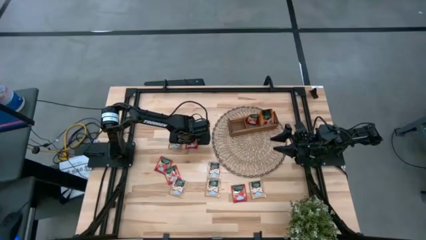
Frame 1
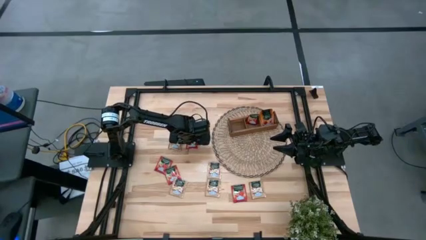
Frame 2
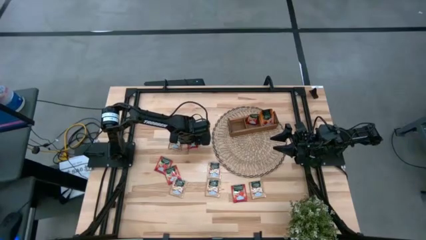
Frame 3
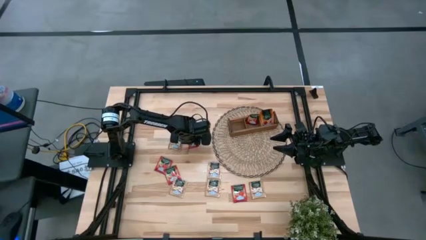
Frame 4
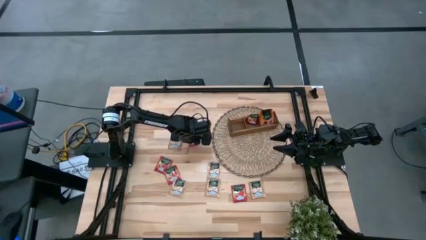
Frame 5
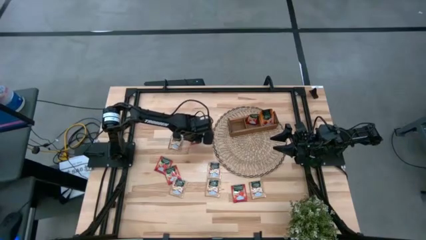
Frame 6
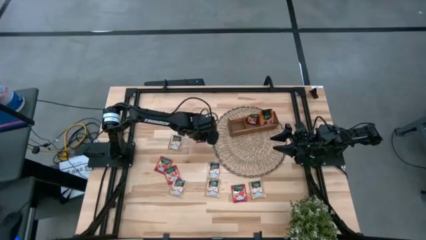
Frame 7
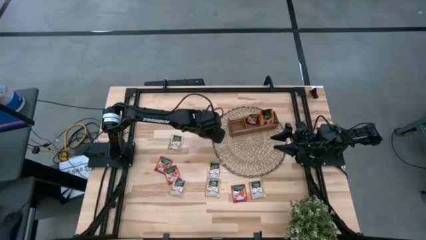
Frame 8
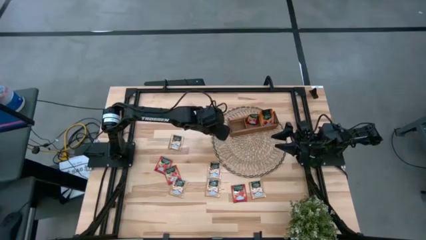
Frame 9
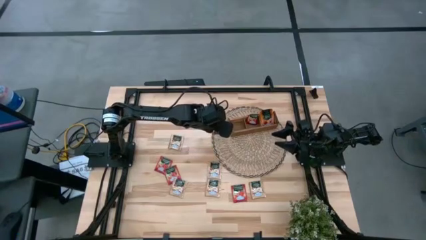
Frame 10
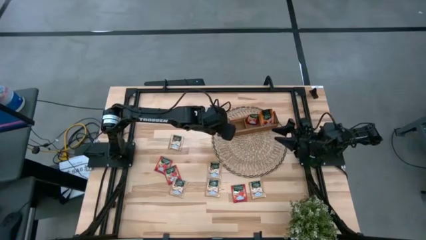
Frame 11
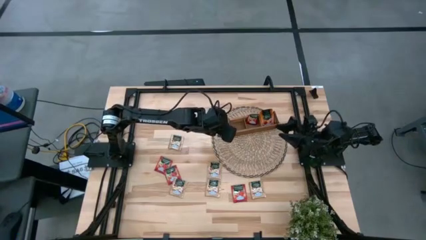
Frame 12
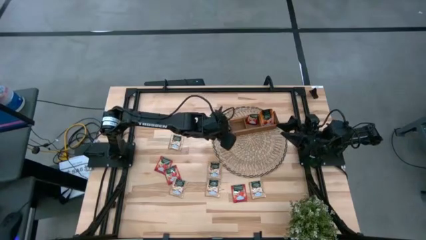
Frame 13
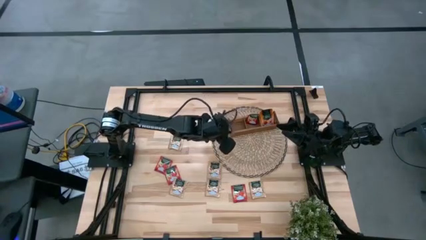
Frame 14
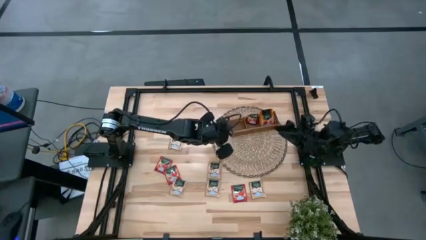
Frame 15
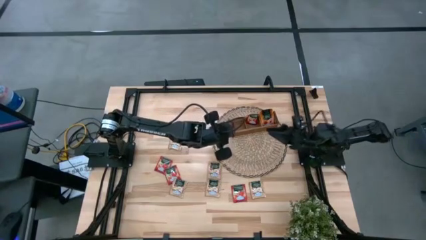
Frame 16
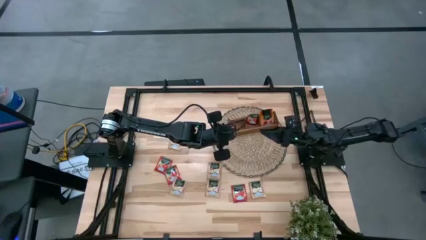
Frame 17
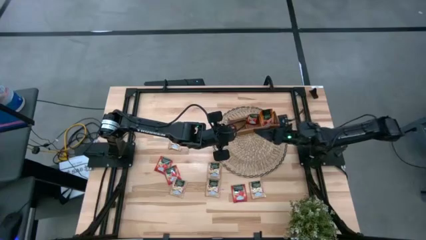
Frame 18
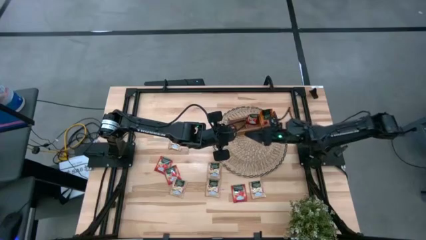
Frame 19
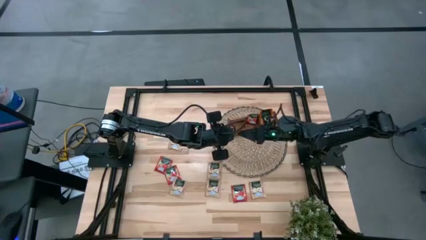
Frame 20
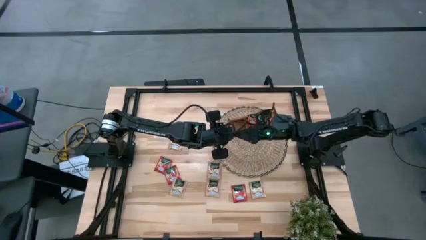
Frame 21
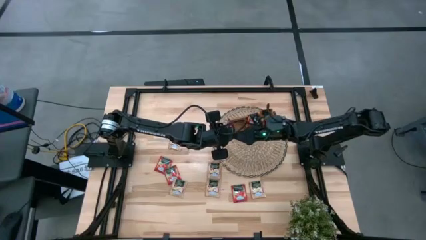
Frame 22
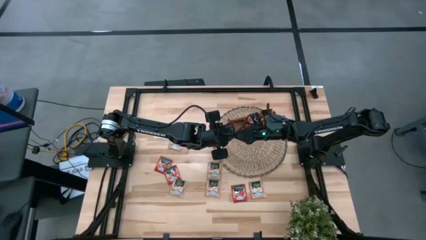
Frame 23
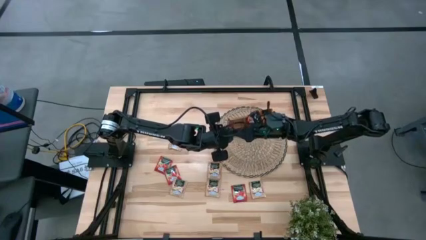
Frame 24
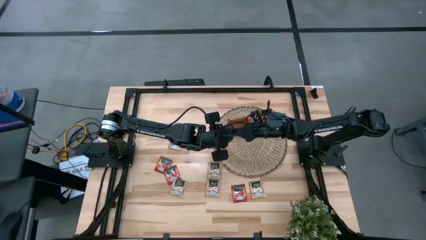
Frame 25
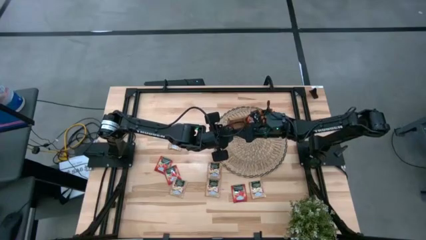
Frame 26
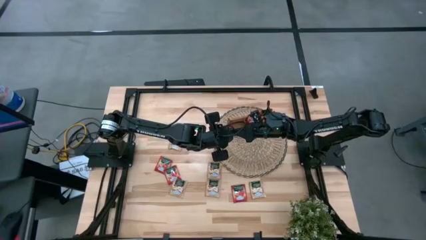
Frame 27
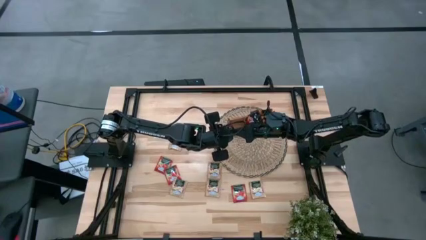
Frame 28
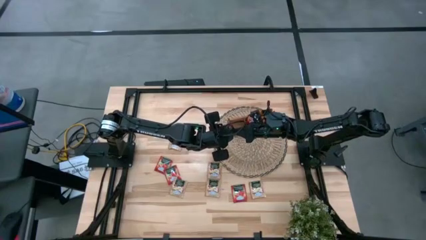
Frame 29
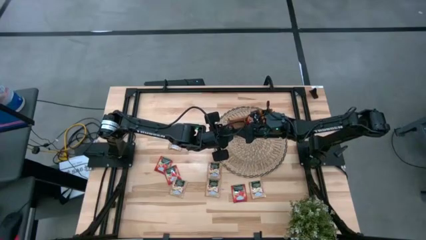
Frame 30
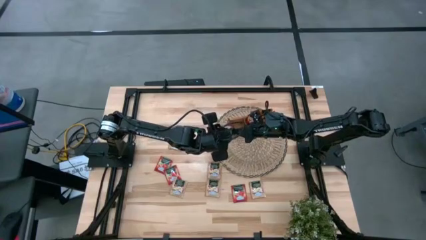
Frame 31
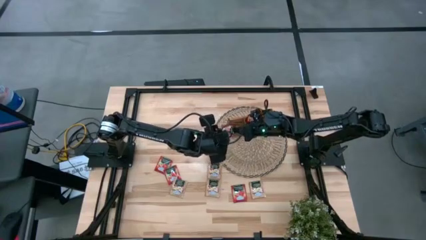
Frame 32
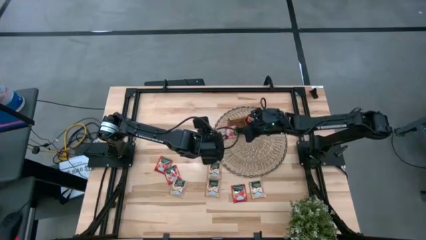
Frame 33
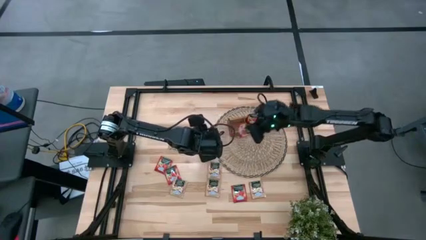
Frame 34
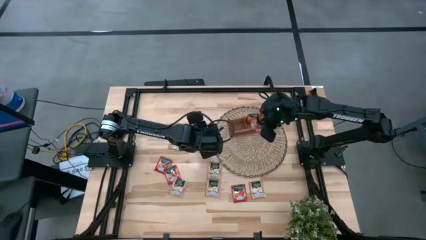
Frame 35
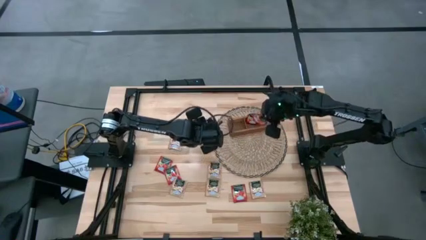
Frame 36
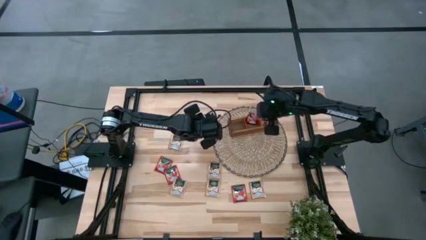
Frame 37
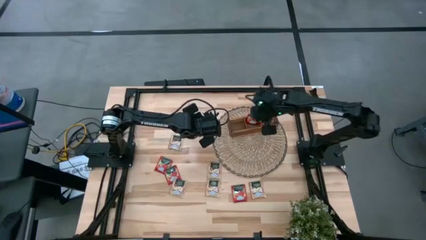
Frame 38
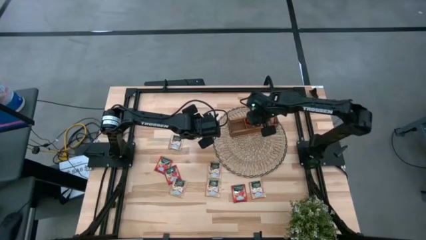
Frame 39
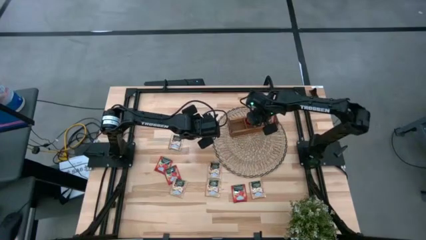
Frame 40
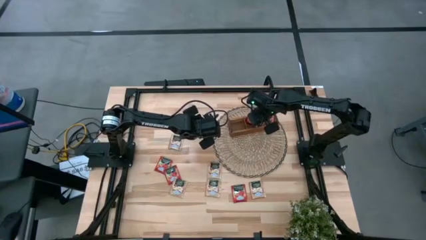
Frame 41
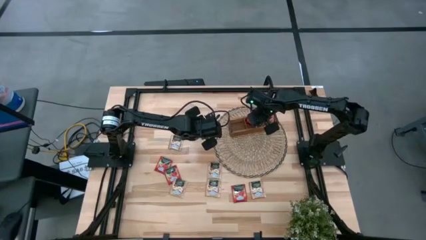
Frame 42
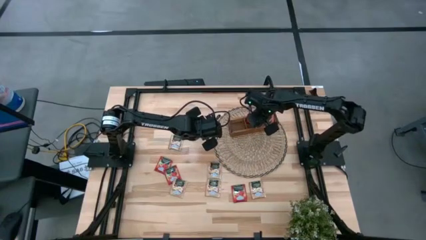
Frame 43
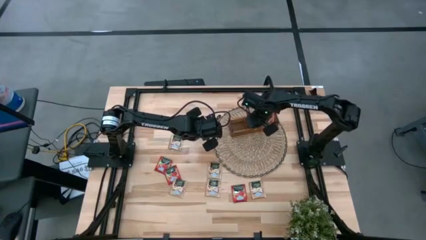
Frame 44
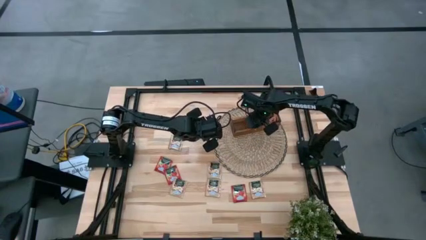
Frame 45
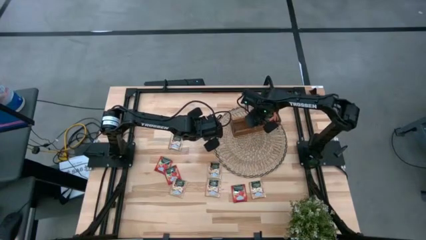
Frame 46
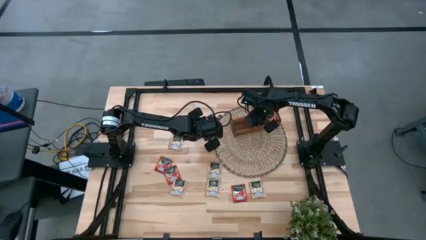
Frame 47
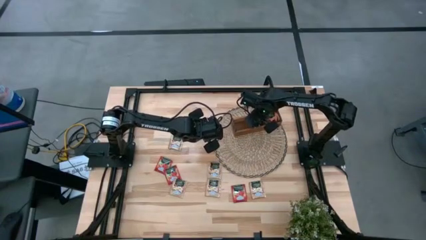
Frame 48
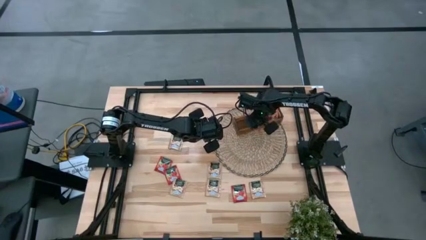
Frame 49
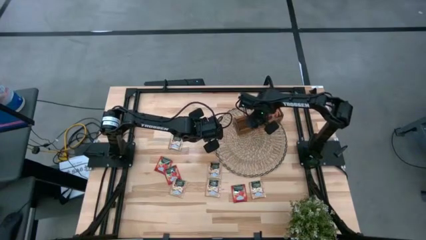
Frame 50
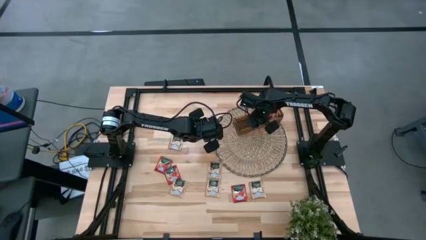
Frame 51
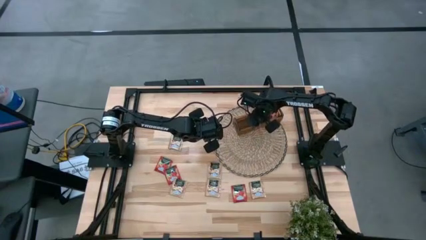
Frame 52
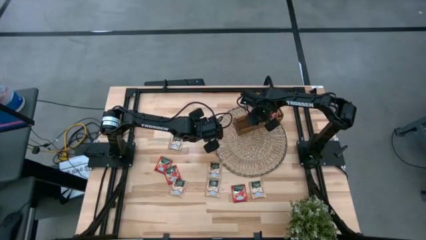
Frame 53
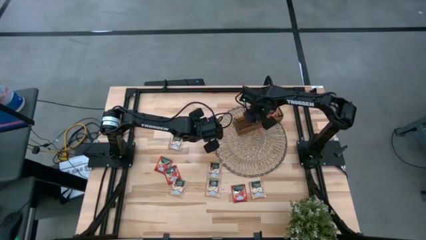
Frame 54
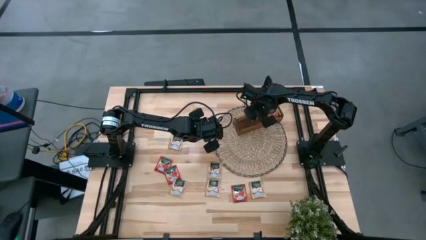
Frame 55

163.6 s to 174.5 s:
Task: Pick & Place Tea
Put the red tea pack into the middle compartment of the brown organizer
